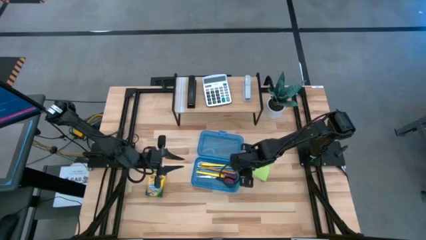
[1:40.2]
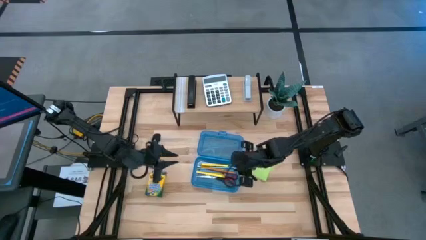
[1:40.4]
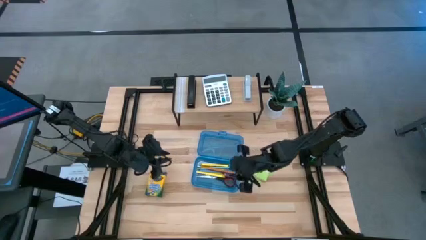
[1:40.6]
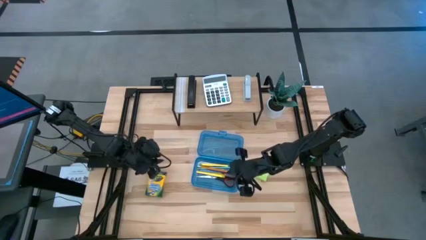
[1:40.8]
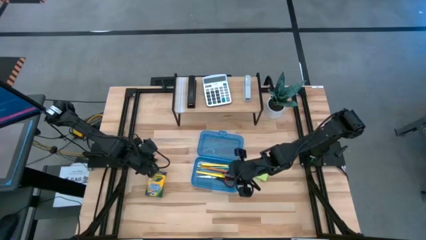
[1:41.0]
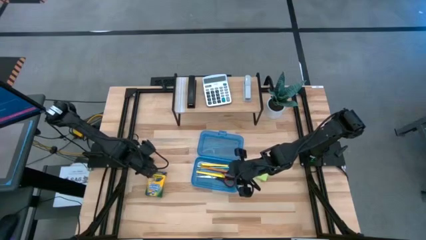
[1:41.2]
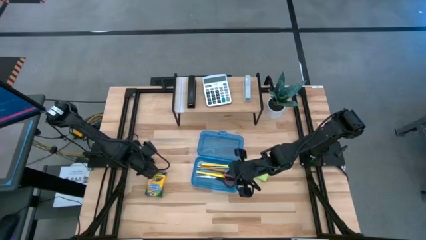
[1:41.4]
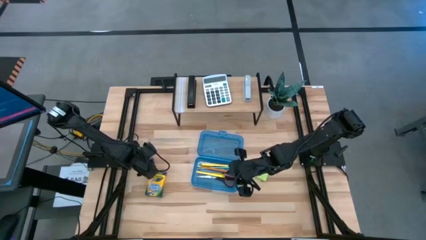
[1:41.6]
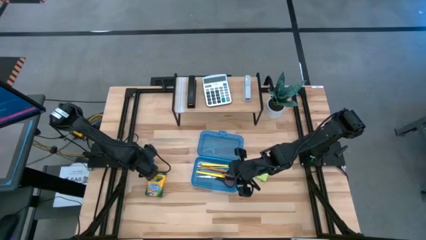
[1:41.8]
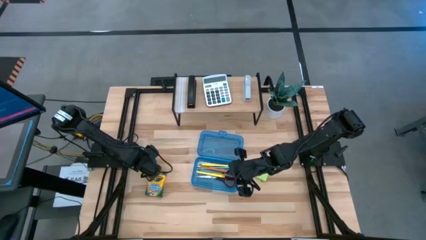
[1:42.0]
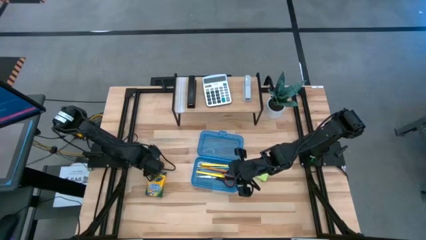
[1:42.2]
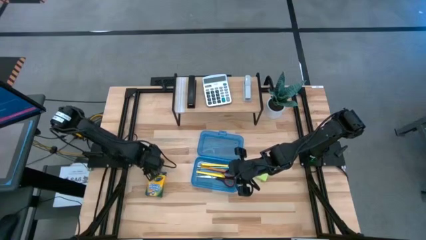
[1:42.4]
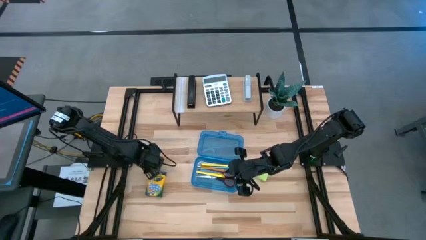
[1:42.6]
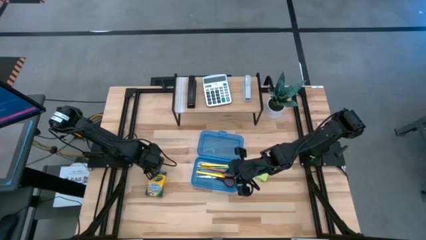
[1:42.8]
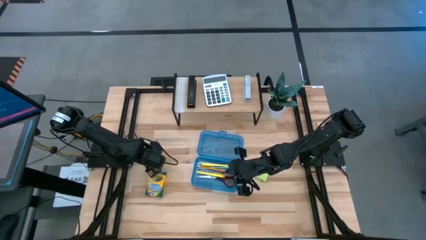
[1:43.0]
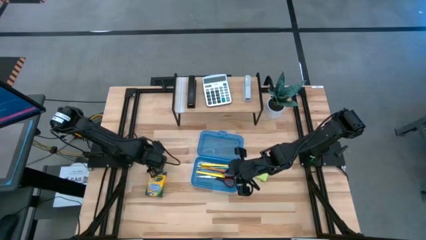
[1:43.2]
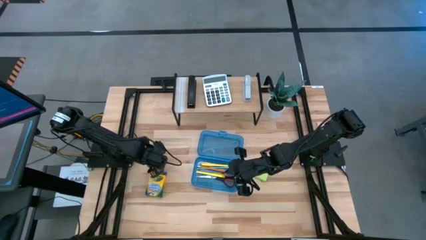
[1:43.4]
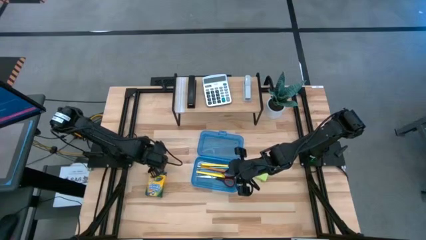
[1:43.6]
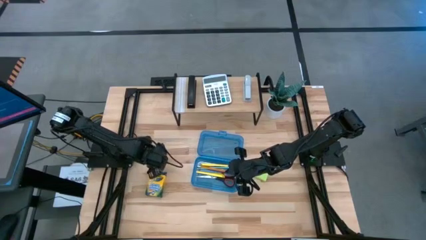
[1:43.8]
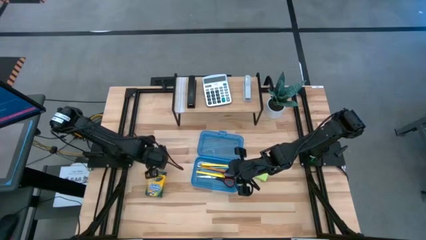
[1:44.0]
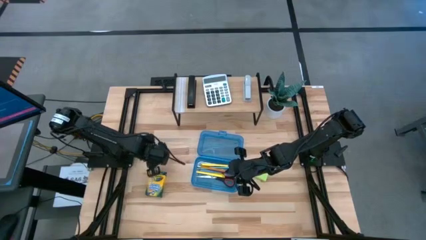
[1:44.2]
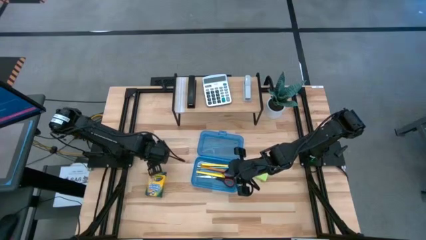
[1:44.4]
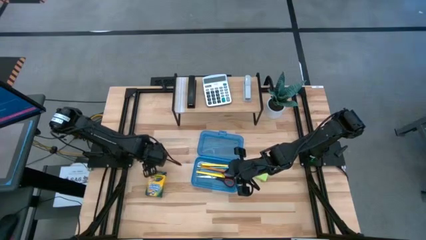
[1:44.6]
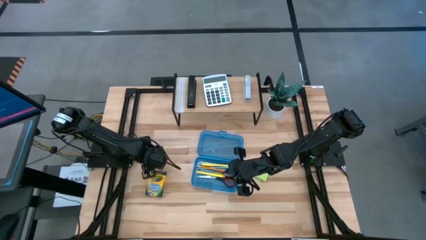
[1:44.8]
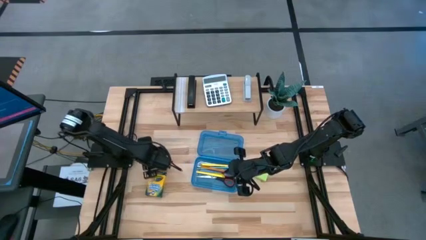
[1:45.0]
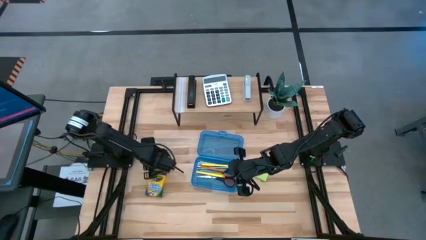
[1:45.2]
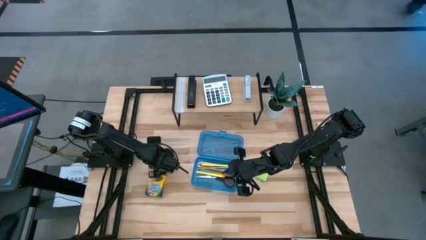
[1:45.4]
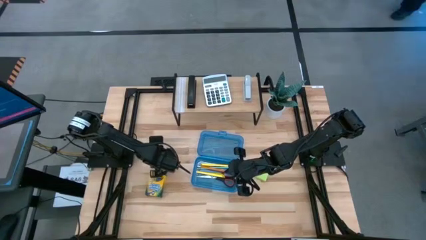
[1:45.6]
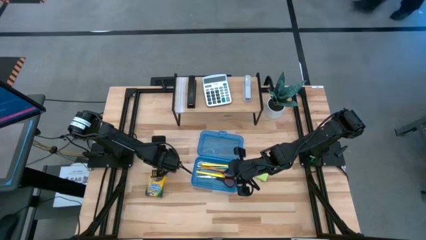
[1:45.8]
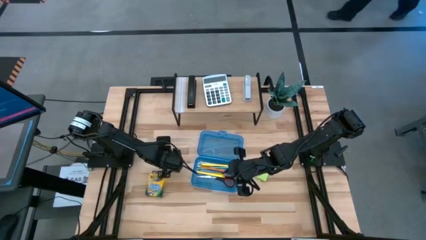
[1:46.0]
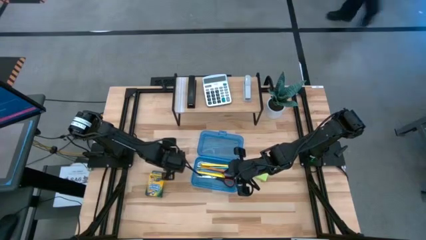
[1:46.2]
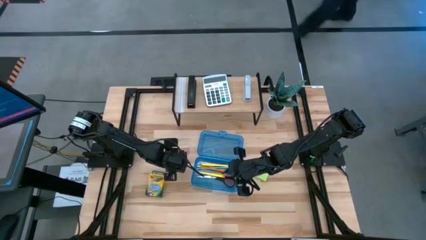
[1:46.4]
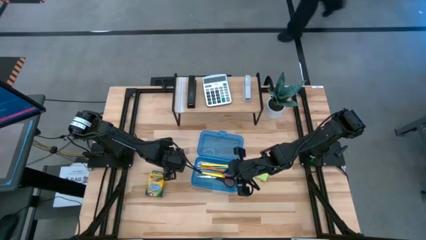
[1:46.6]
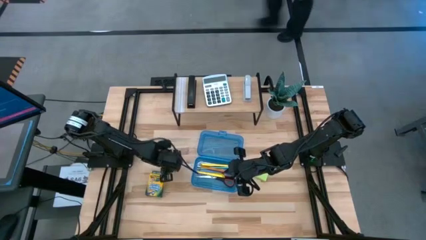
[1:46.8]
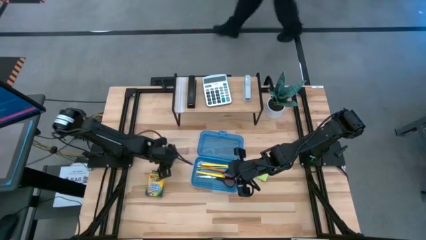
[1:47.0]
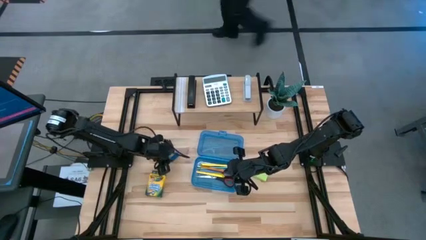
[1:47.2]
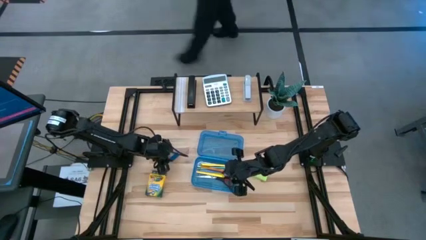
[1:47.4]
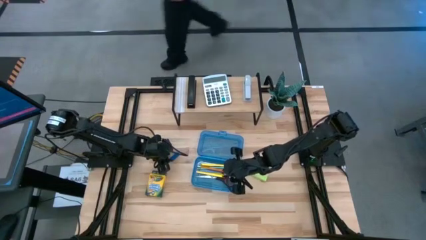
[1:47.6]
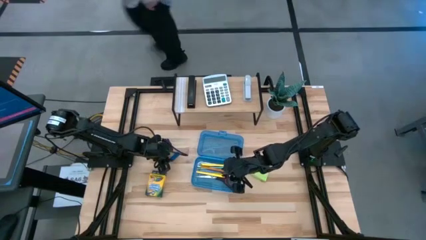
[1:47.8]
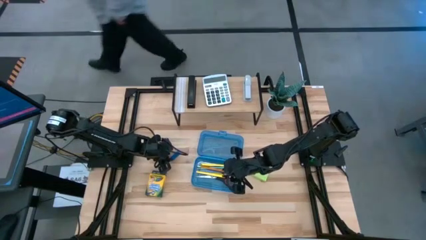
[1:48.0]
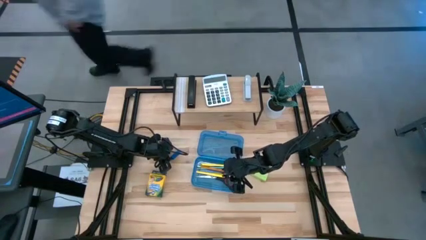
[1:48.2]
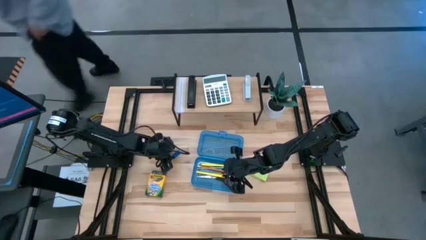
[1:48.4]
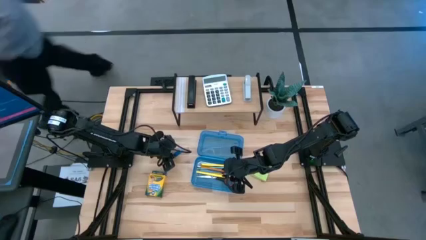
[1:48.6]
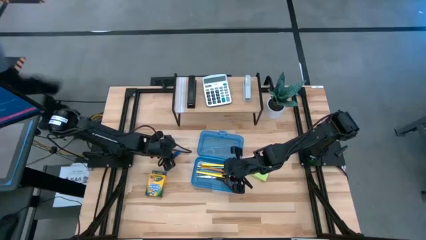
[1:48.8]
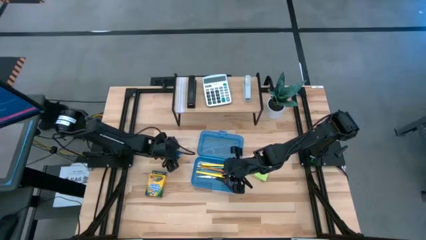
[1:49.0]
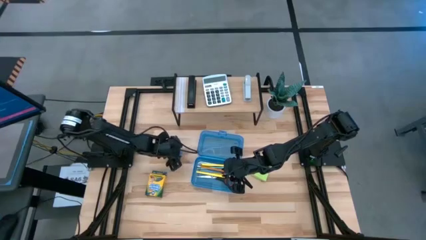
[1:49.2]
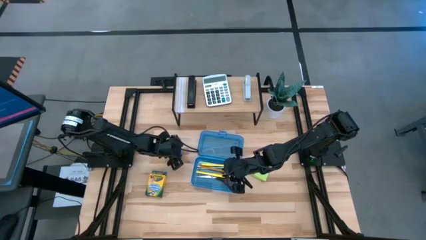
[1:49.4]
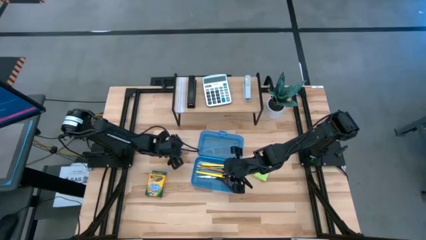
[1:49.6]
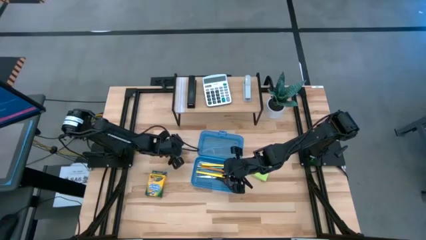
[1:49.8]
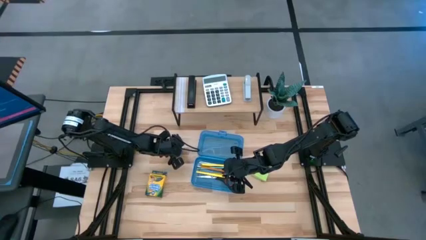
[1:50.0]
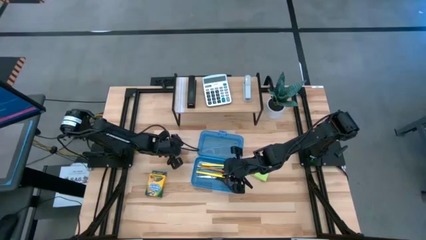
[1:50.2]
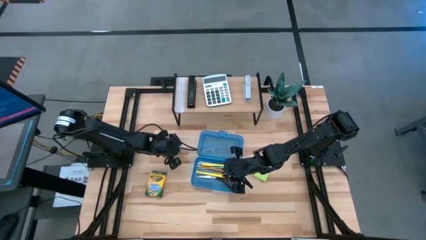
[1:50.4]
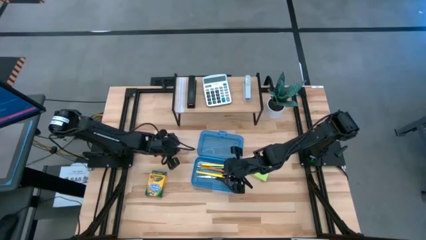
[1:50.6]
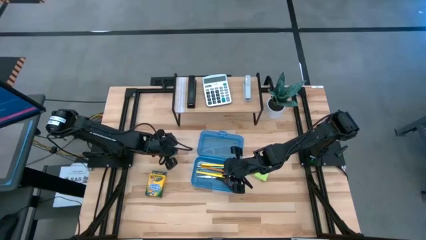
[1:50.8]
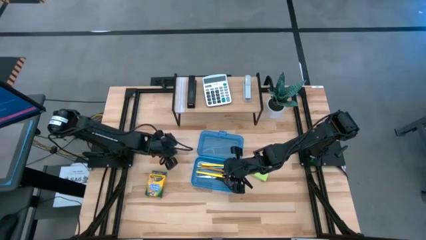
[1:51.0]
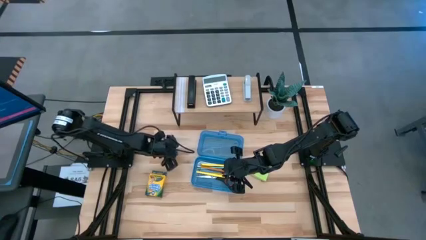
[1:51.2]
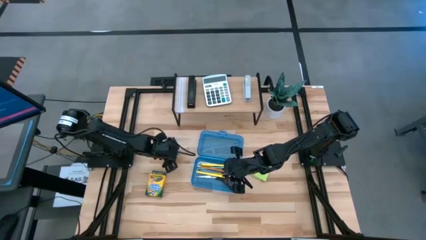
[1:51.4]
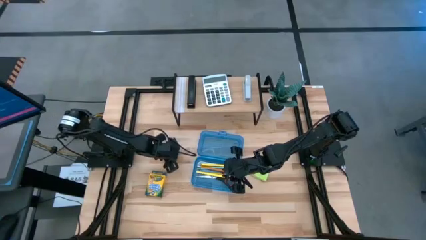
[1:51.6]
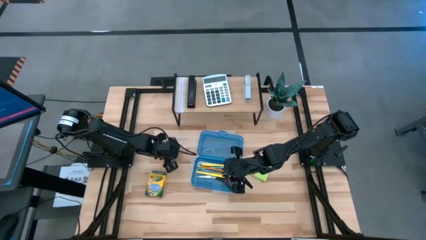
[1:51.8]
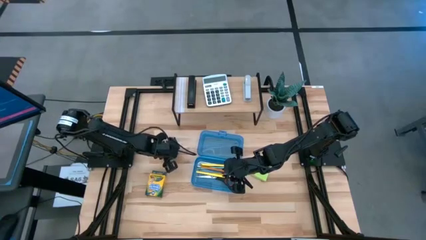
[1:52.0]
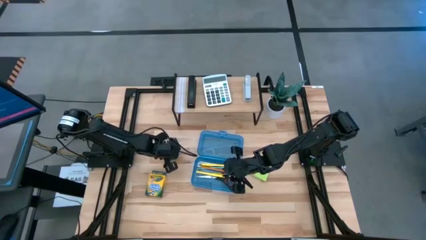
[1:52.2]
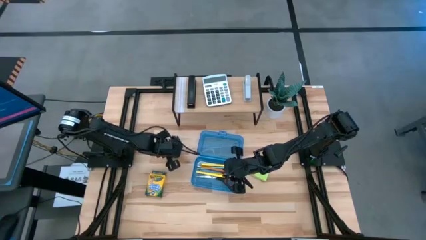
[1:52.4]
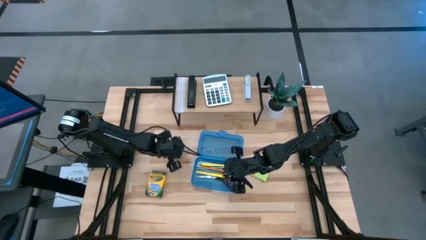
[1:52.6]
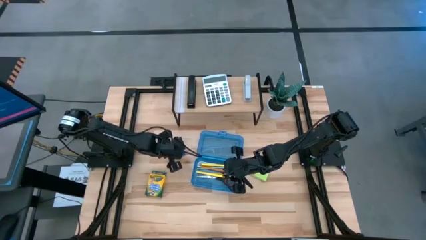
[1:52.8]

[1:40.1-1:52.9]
Task: Pack school essentials
Put the blue eraser into the blue supply box

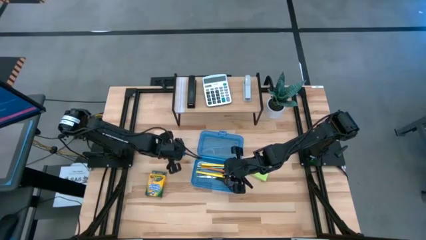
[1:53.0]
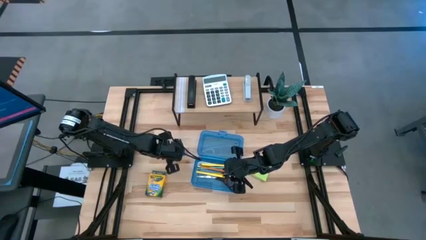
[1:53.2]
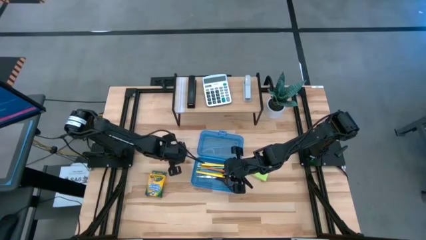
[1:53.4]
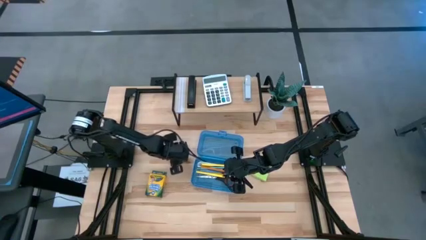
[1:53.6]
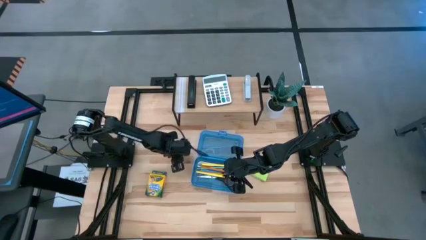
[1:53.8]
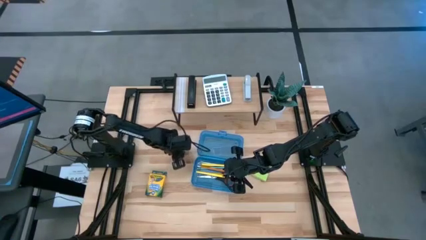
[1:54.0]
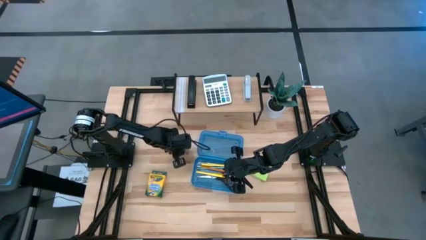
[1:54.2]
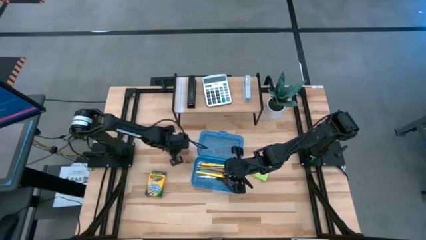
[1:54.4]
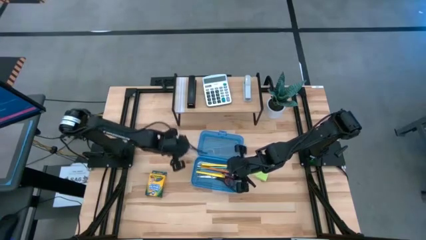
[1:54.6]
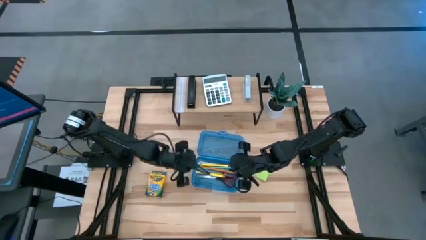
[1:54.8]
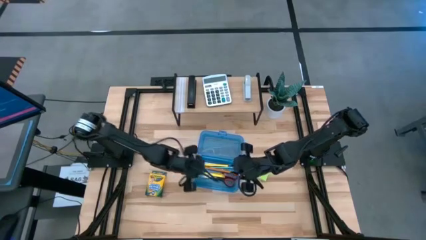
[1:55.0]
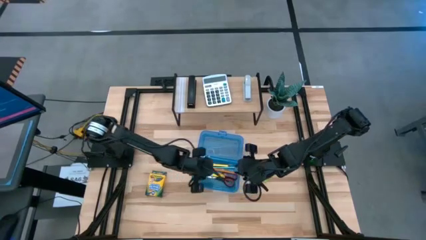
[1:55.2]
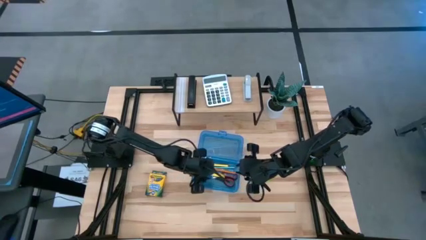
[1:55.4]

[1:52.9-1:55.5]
Put the blue eraser into the blue supply box

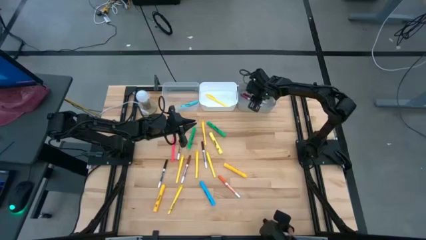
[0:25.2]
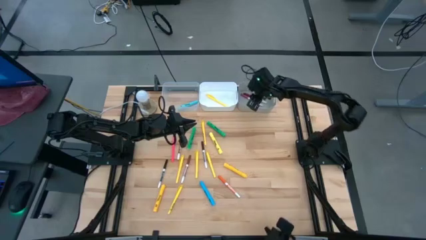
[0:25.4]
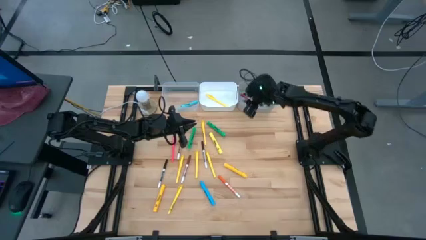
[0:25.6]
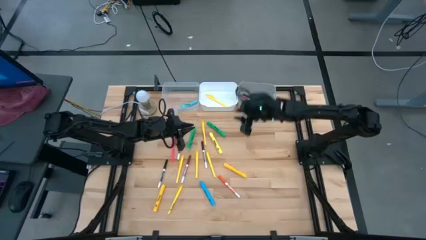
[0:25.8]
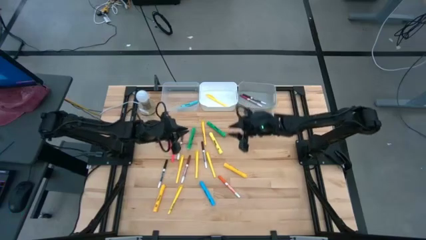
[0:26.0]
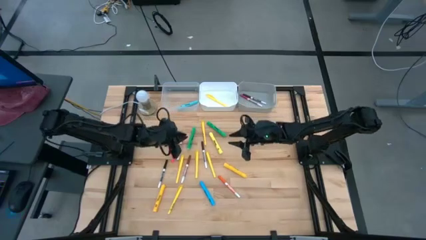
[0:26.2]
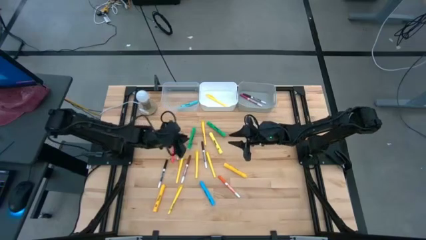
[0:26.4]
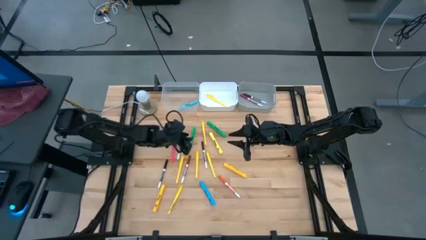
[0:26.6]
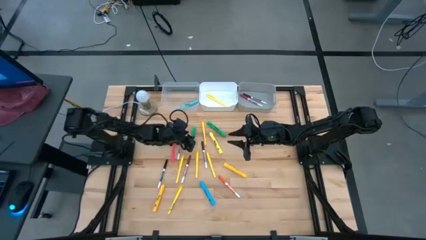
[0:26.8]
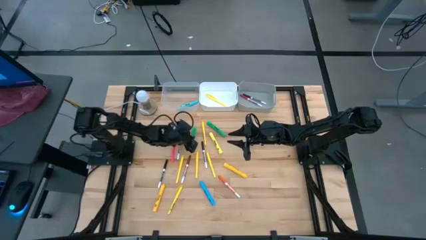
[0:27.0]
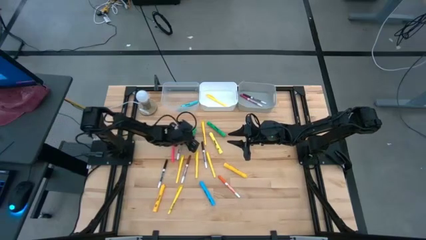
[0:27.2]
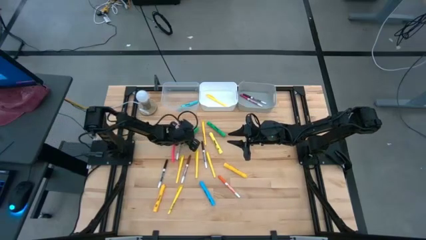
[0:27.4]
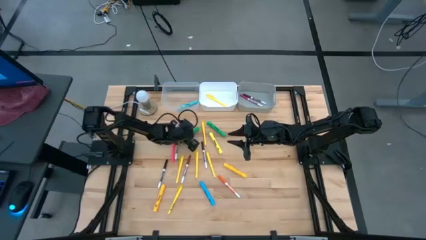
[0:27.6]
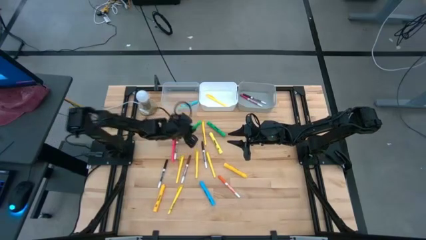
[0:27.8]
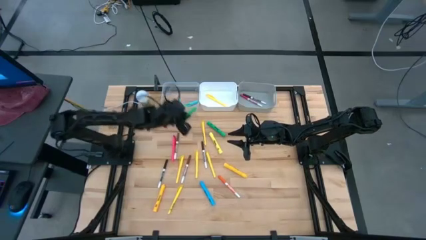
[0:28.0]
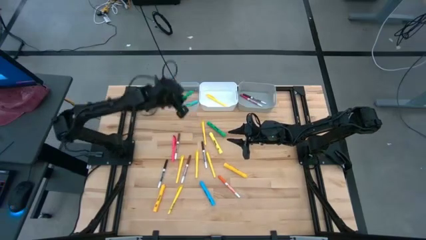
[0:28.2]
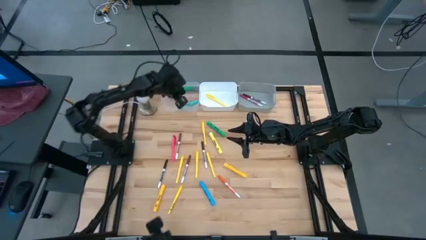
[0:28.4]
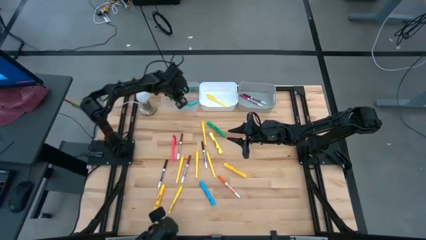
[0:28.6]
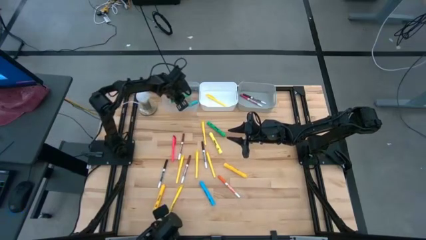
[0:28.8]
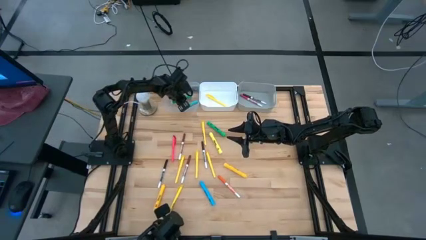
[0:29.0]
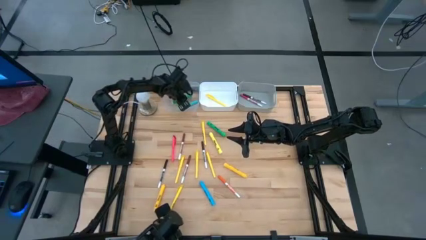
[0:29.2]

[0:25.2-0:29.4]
Task: Pick & Place Markers
Put the green highlighter pen into the transparent bin
